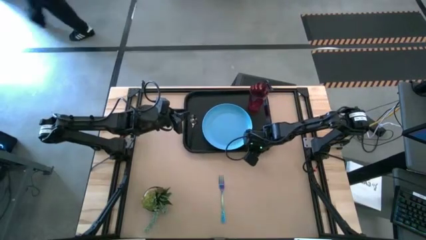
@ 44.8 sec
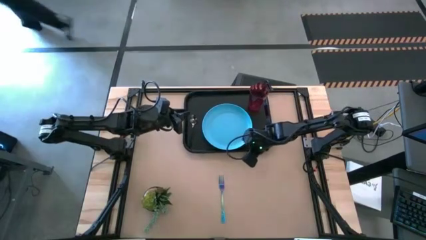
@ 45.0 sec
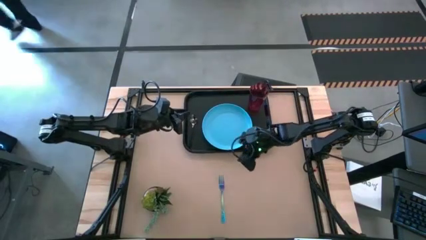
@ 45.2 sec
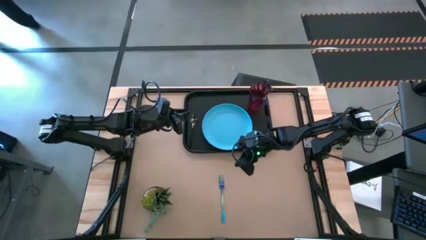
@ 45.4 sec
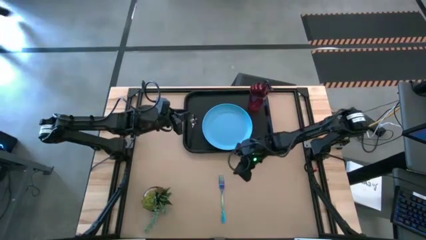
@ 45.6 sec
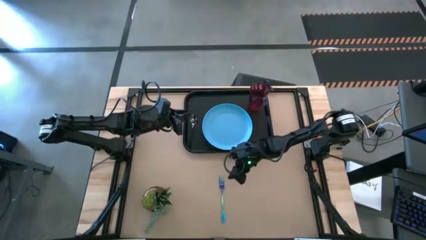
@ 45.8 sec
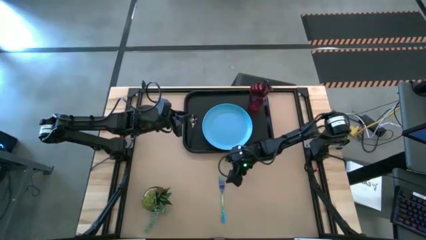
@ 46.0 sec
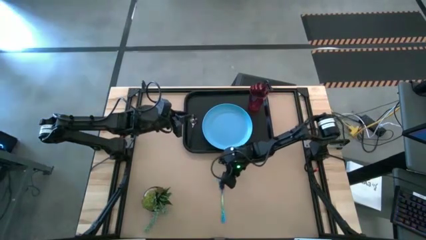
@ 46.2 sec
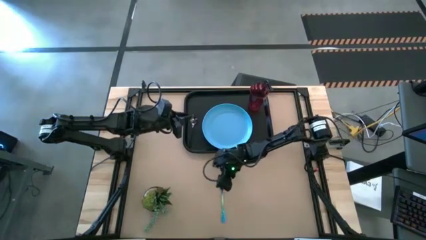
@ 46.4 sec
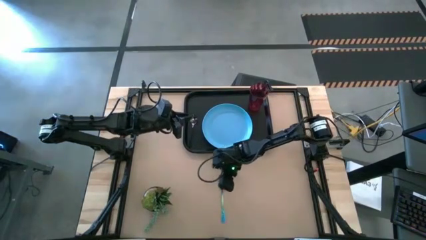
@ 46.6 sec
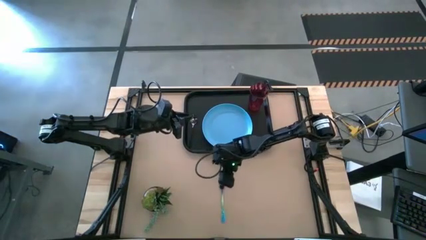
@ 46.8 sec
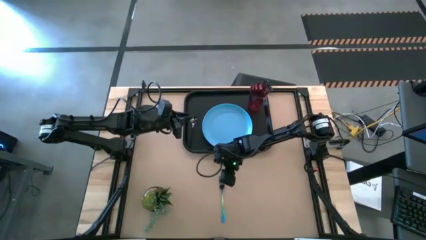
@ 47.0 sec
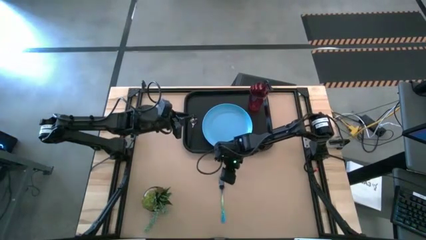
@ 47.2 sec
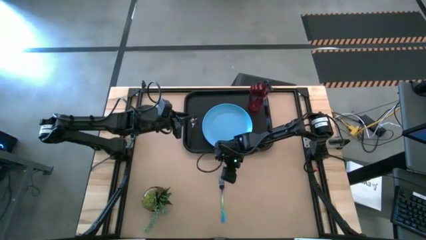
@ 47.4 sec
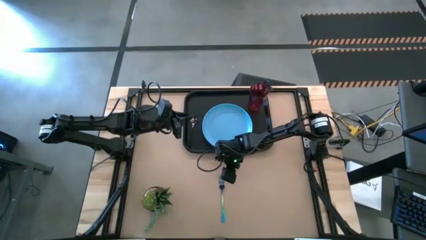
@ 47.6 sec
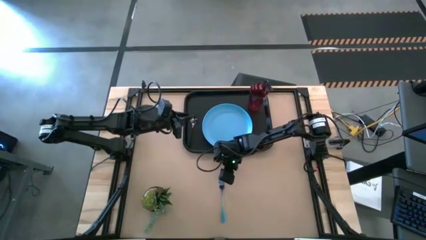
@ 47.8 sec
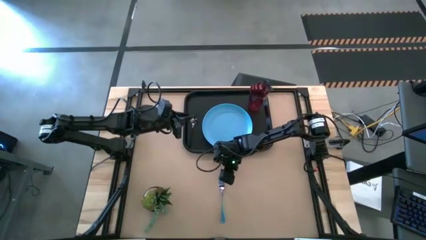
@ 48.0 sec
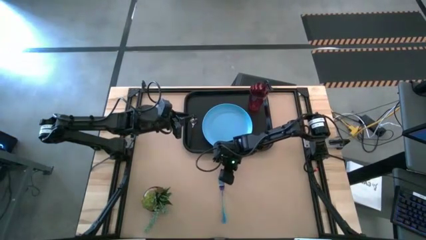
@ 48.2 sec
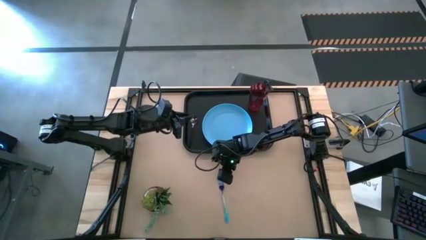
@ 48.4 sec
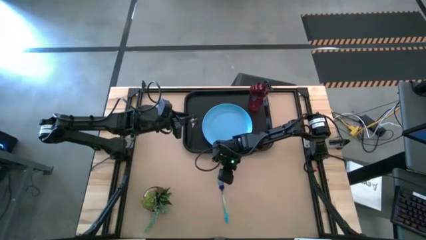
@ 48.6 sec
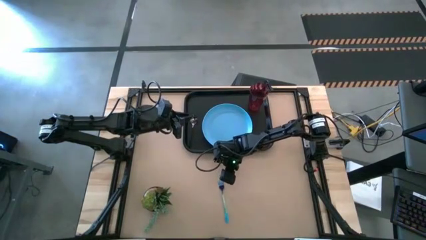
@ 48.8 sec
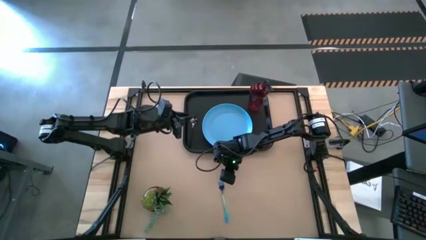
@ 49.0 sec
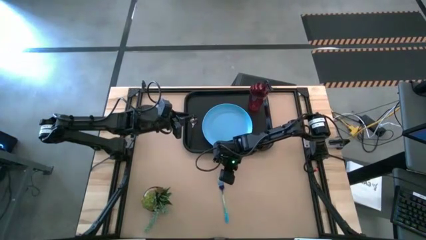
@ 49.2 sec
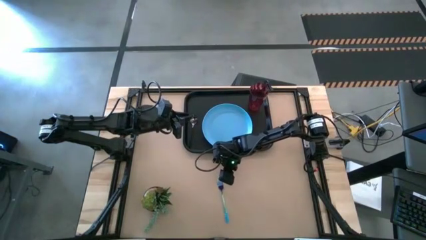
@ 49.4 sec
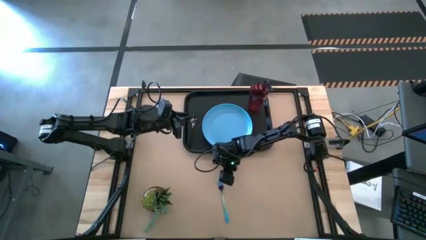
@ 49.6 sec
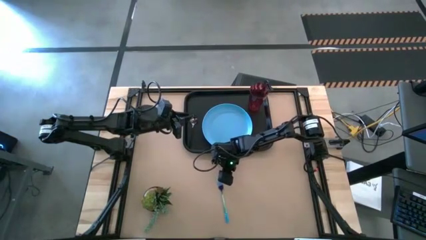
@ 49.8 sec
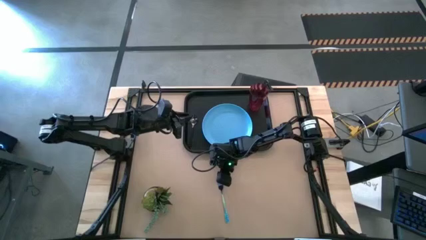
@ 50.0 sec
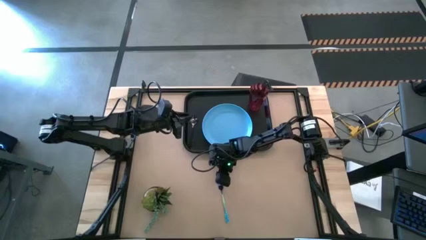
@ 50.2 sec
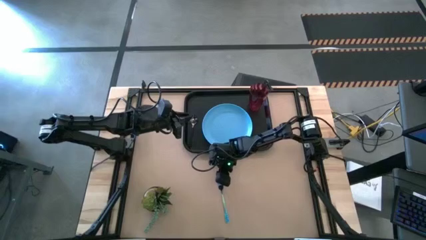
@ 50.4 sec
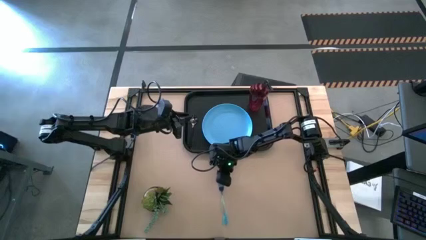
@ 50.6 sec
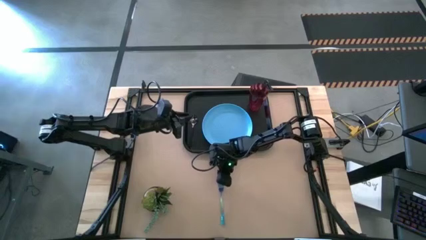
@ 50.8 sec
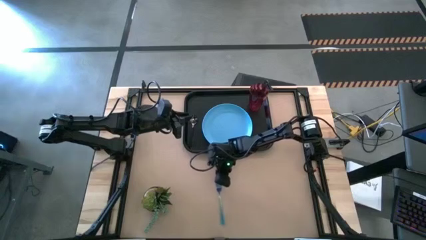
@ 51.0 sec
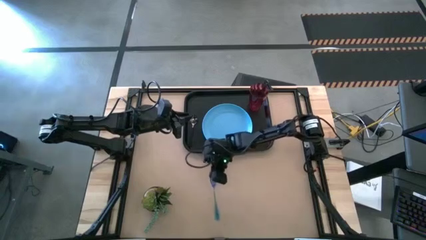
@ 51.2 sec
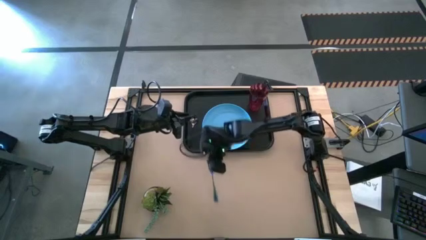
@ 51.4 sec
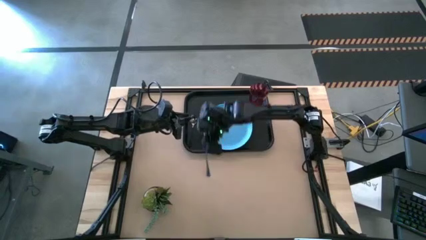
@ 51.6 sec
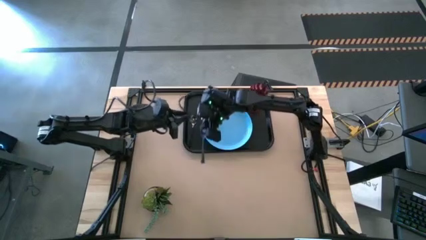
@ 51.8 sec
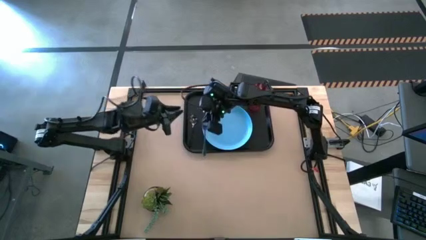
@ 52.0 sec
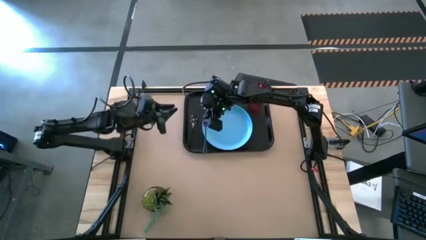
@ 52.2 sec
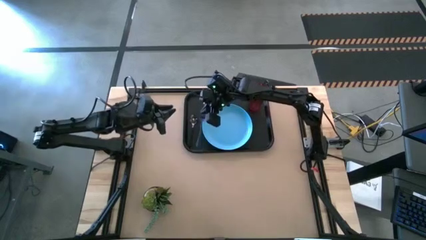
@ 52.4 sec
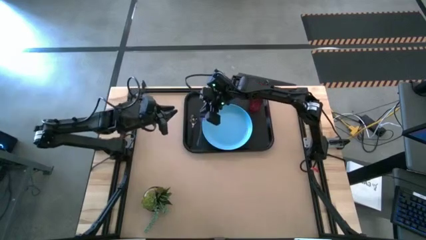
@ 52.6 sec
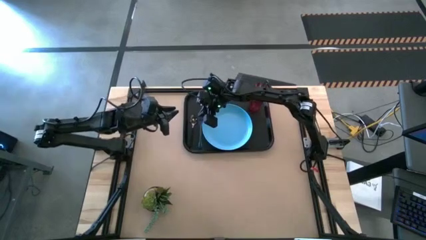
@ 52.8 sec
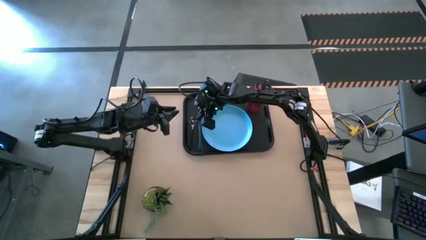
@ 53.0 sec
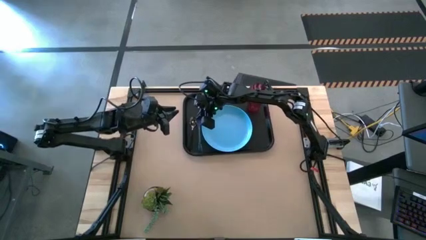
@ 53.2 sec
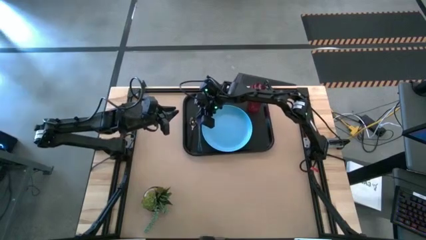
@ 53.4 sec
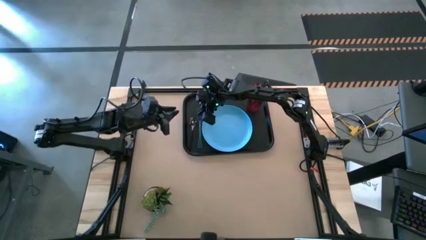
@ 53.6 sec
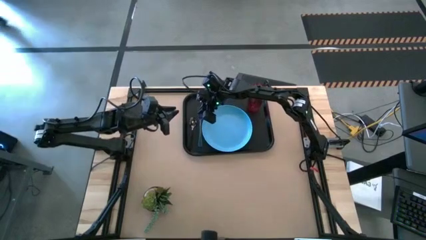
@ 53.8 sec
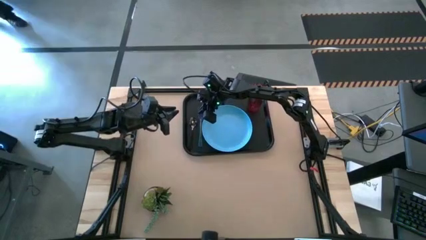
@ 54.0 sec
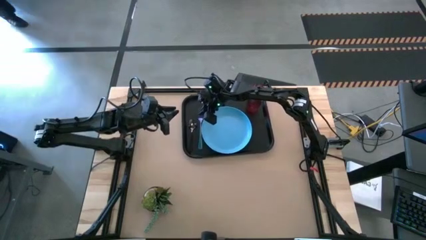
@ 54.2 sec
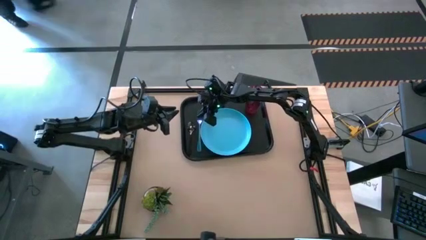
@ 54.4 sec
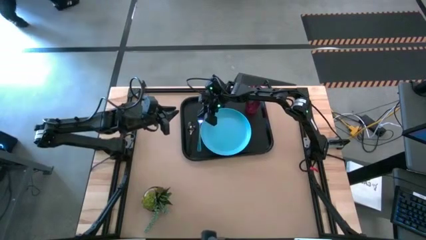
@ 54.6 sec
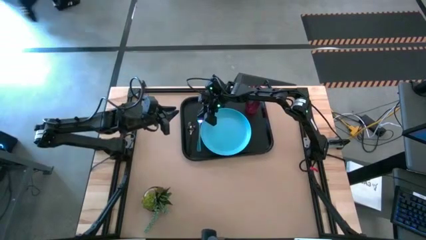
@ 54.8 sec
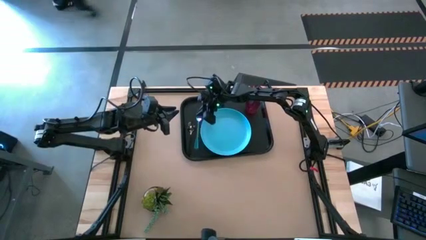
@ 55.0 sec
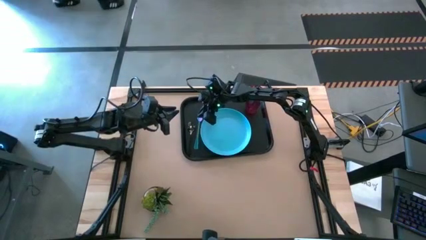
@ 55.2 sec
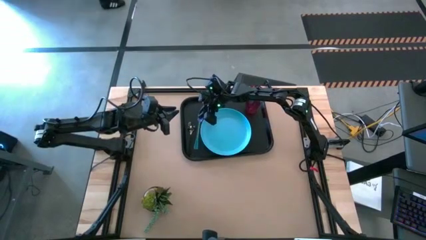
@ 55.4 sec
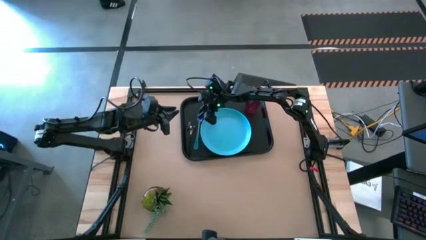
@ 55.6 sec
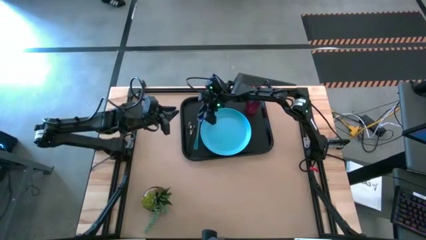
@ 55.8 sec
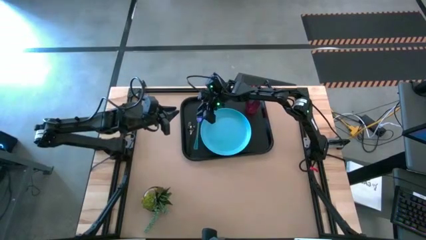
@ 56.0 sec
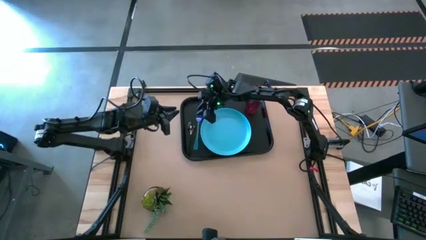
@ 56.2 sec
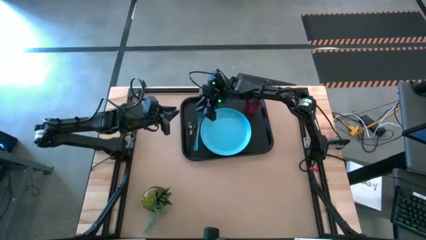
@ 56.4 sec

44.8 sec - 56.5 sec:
Task: Pick and place plate/cup/fork/spoon on tray
Put the blue fork between the black spoon and the blue plate on the black tray
